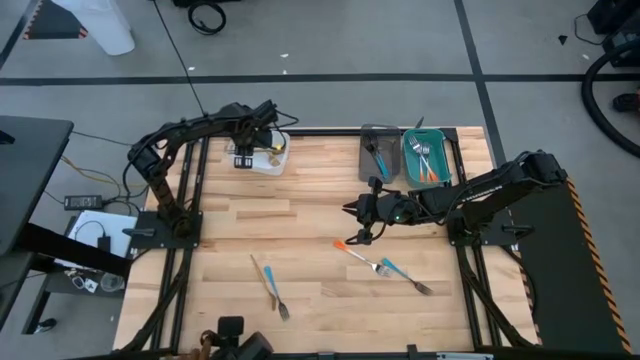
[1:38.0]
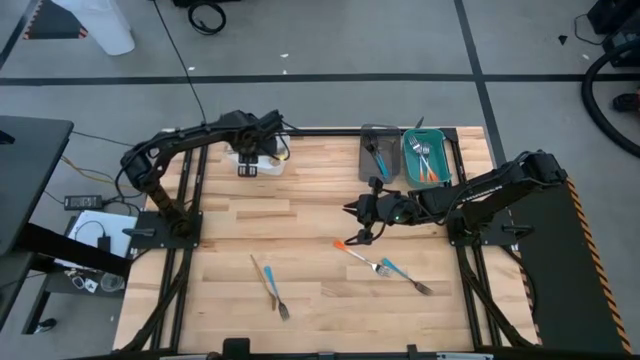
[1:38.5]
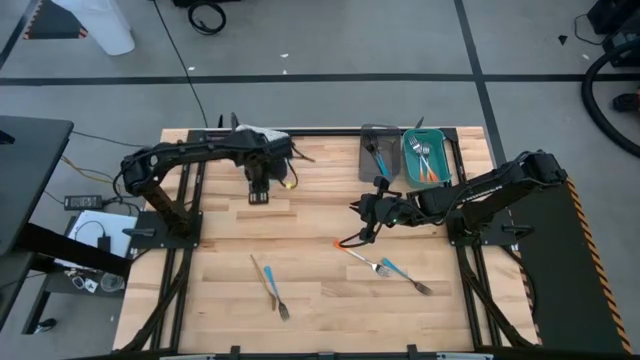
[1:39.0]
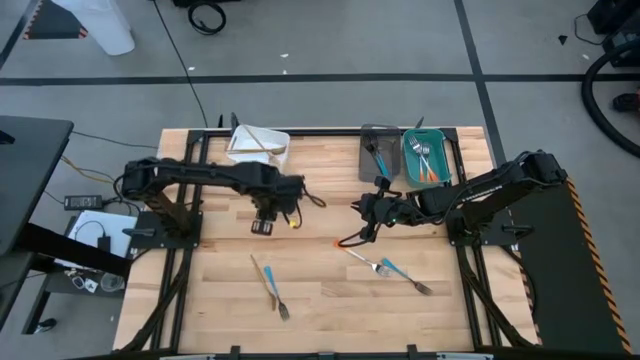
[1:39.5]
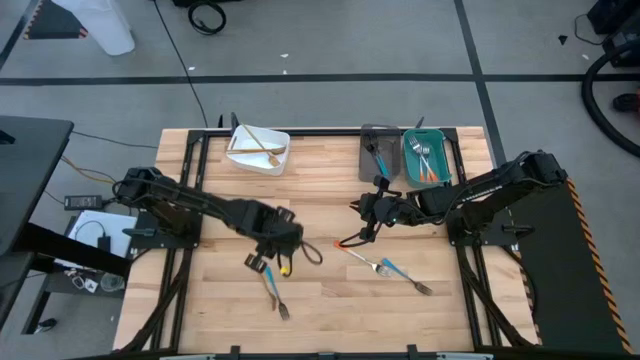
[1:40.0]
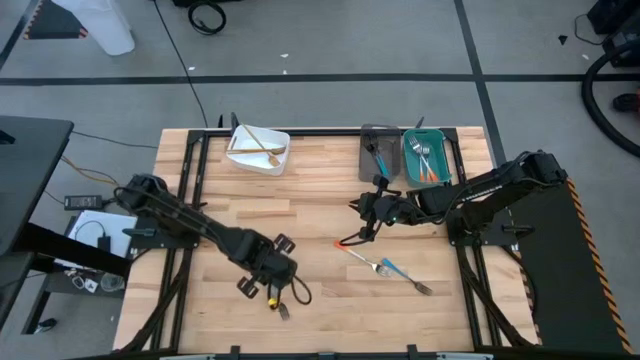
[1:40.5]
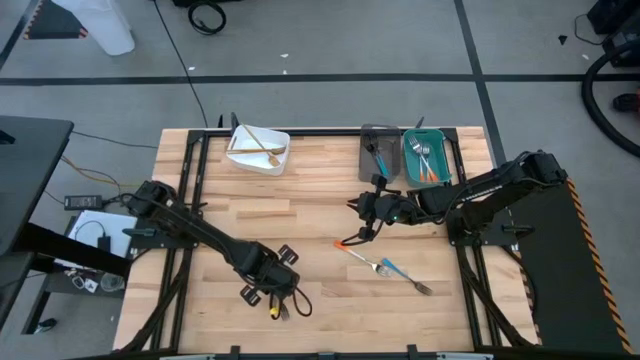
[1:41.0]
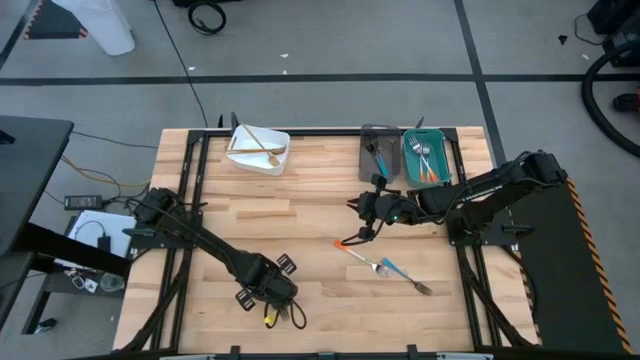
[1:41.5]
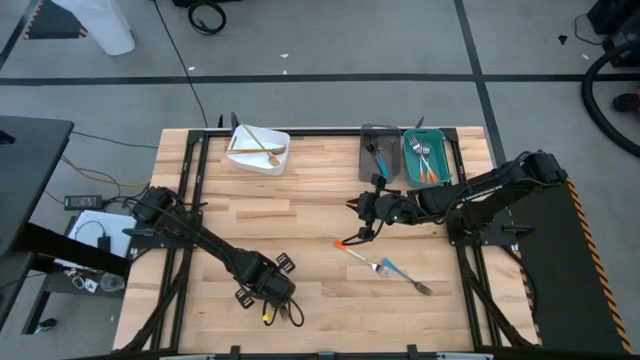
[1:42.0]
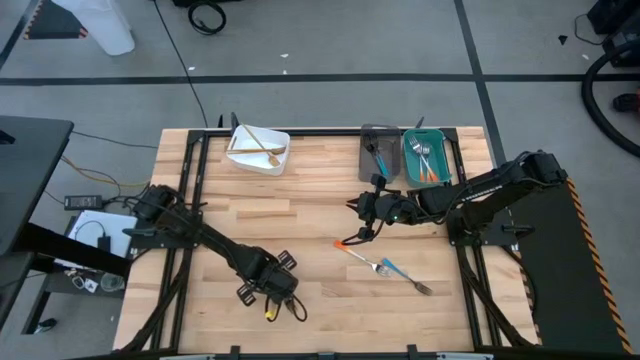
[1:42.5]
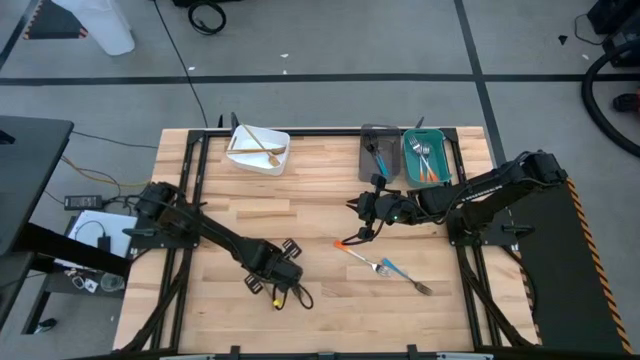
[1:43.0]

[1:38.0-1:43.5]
Task: Sort silverware by color (type)
Put the left blue fork into the black bin

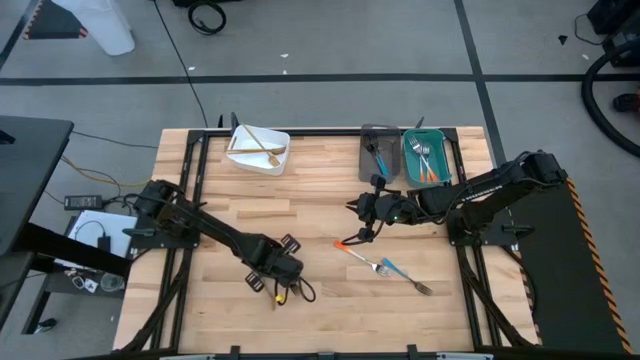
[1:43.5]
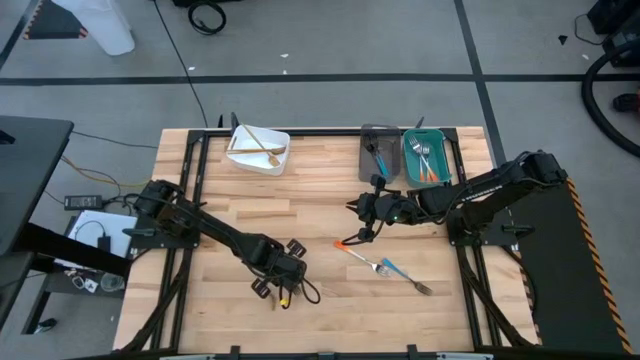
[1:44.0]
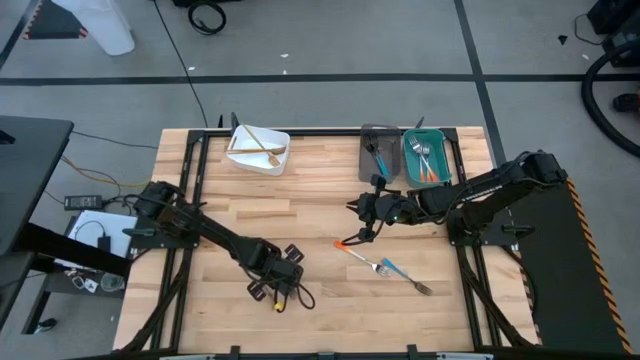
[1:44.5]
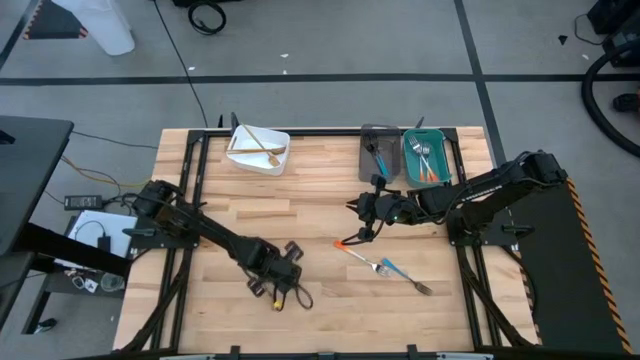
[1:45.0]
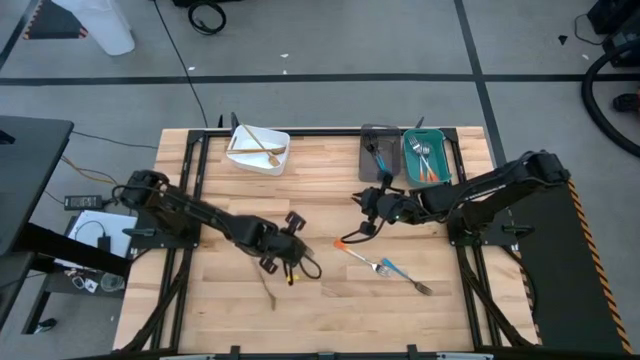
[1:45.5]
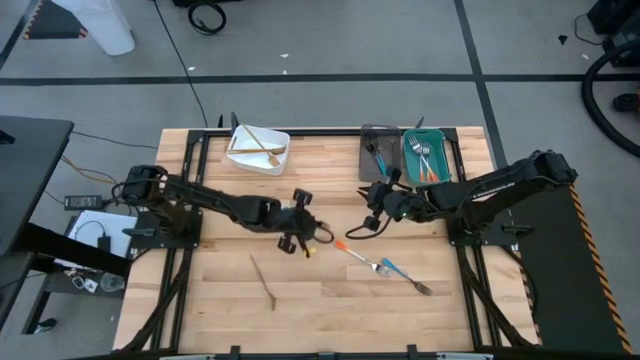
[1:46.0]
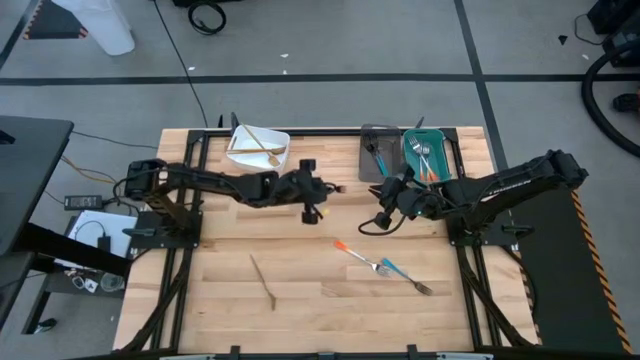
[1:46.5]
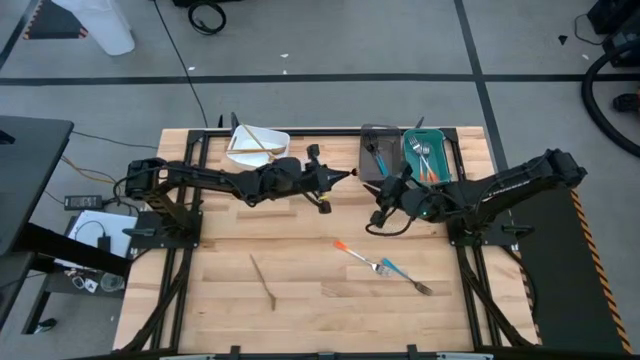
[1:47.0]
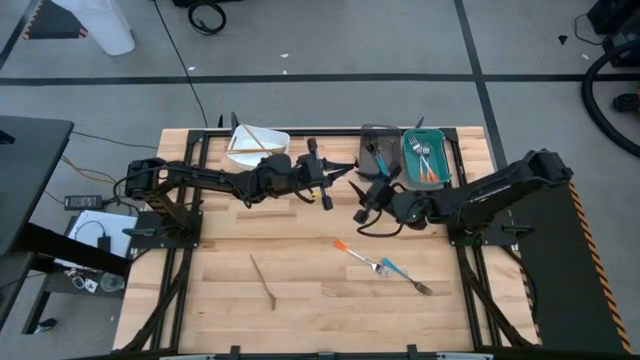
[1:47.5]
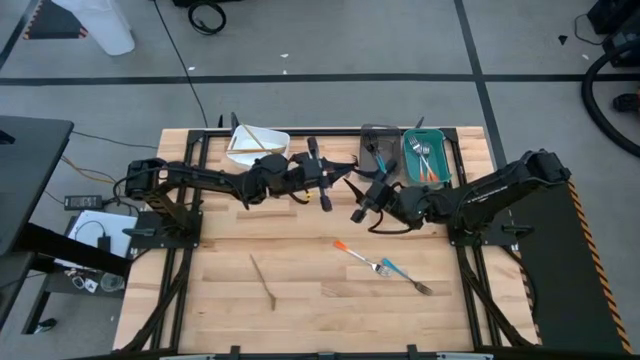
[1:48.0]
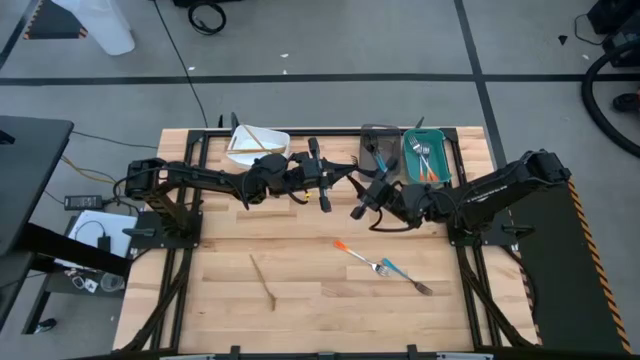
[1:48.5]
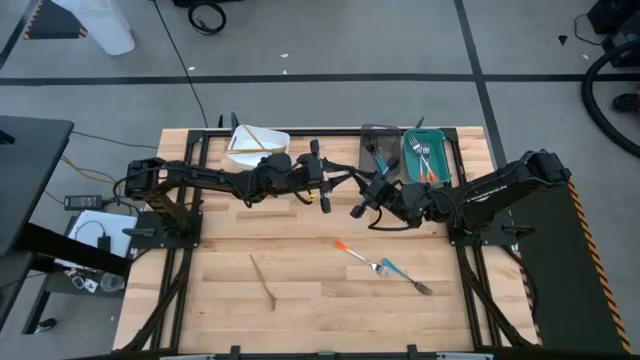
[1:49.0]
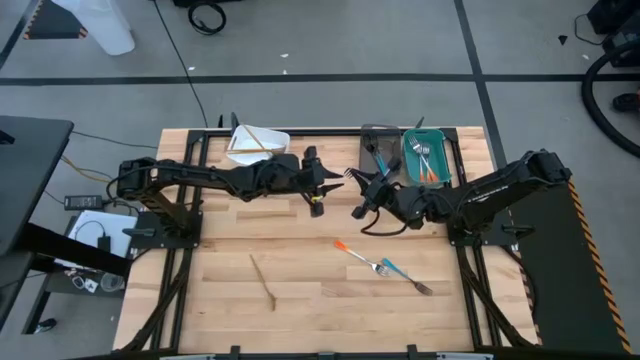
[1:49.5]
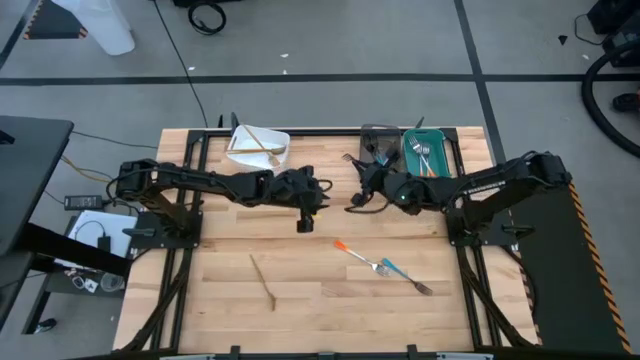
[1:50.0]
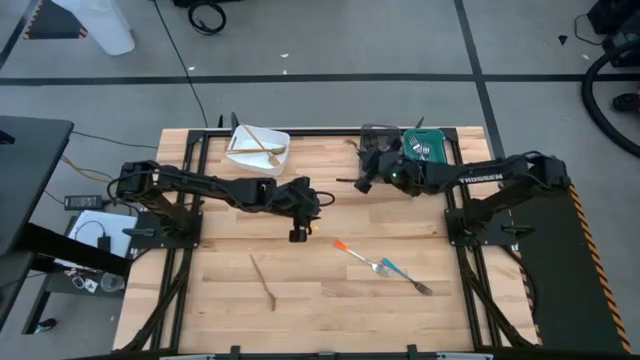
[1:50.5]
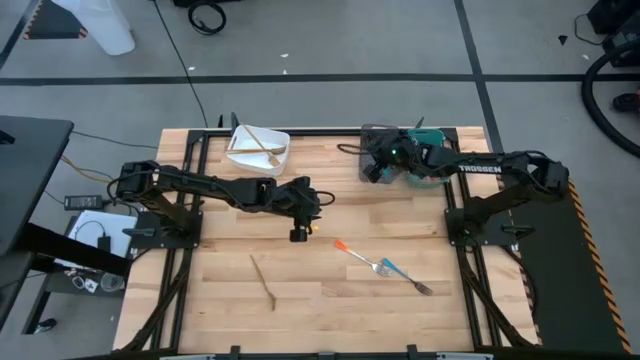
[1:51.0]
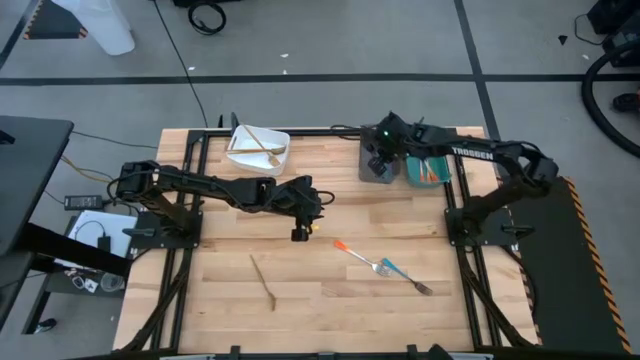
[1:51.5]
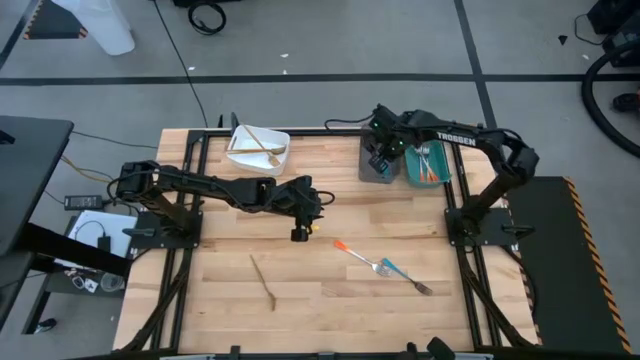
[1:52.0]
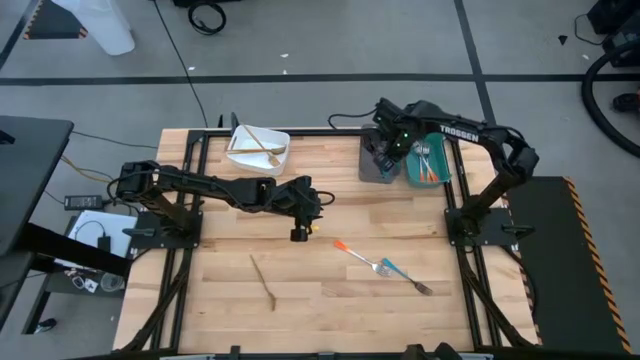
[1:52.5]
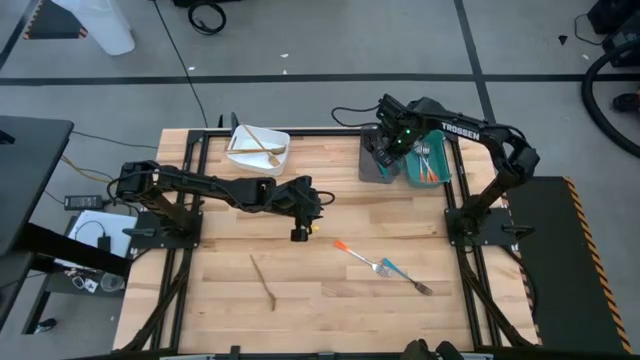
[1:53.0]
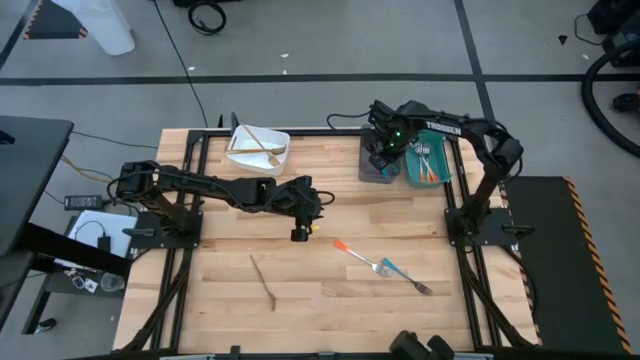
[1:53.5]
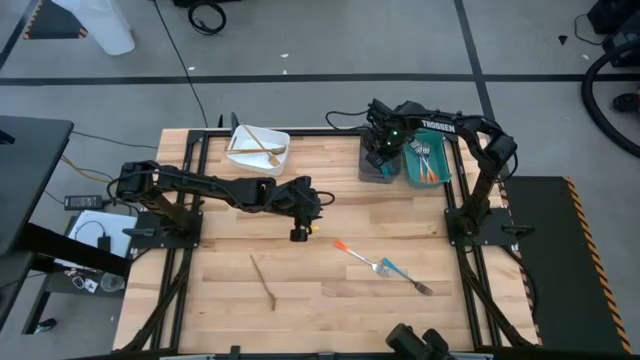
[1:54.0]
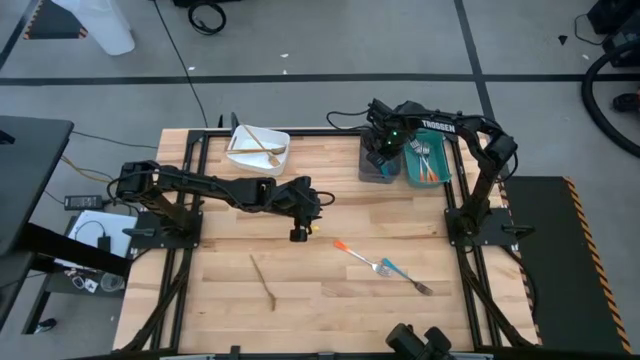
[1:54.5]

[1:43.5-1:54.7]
Put the left blue fork into the black bin

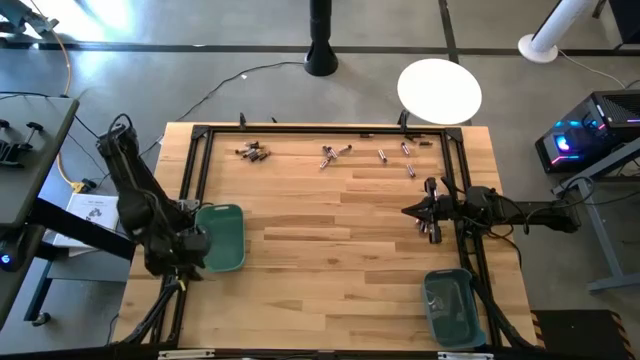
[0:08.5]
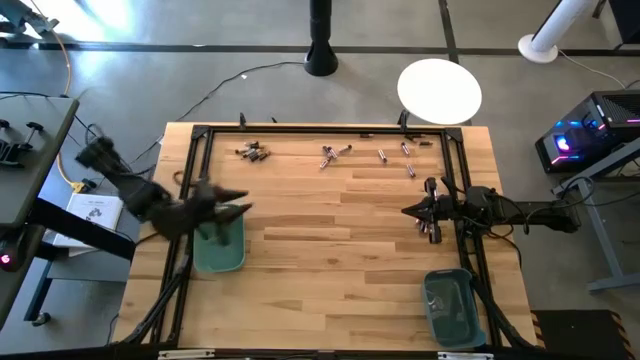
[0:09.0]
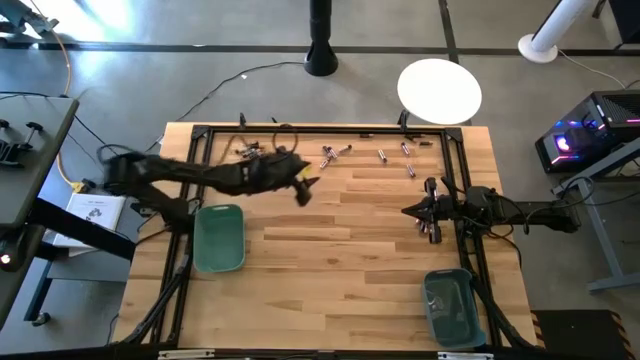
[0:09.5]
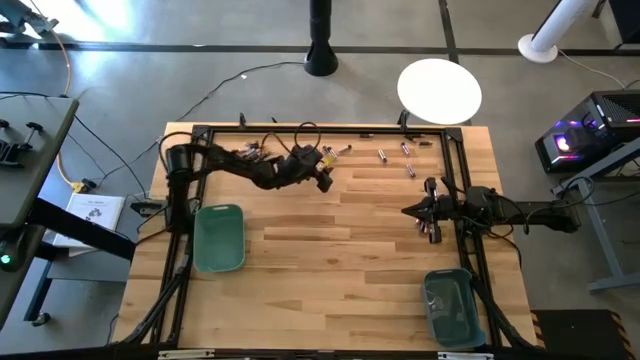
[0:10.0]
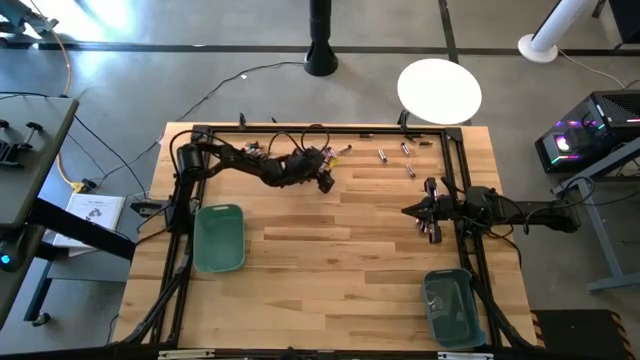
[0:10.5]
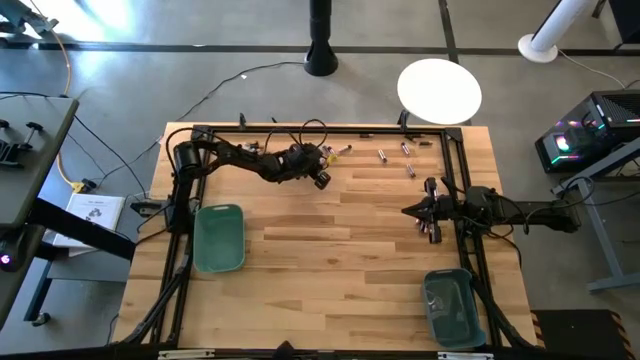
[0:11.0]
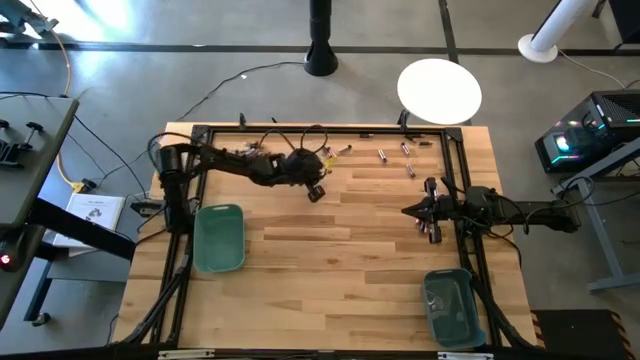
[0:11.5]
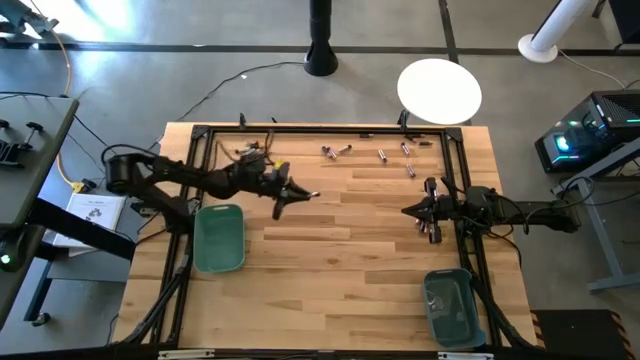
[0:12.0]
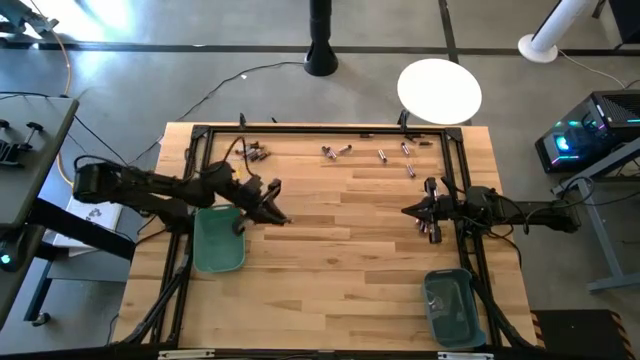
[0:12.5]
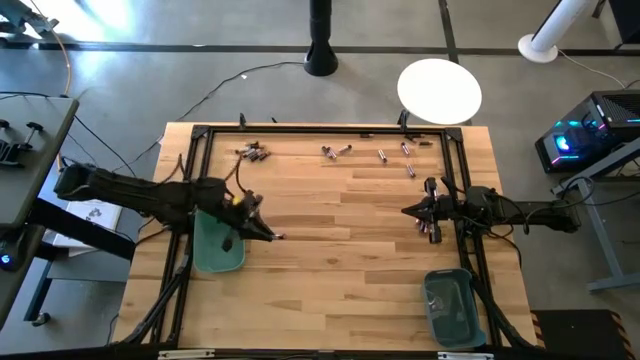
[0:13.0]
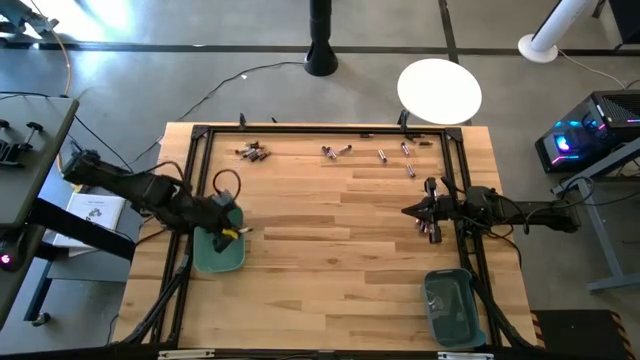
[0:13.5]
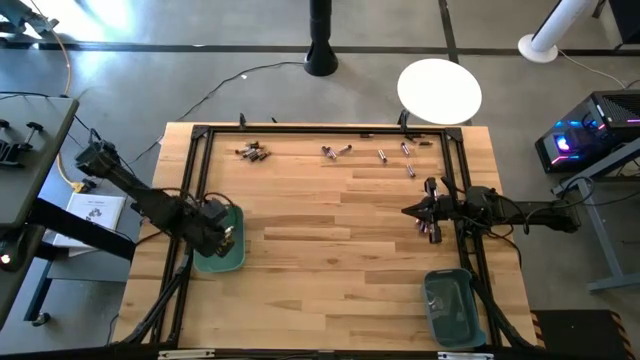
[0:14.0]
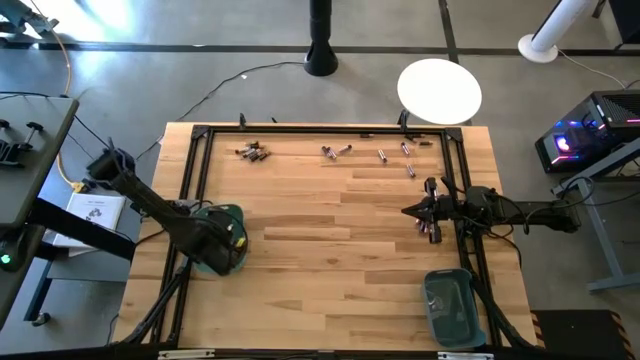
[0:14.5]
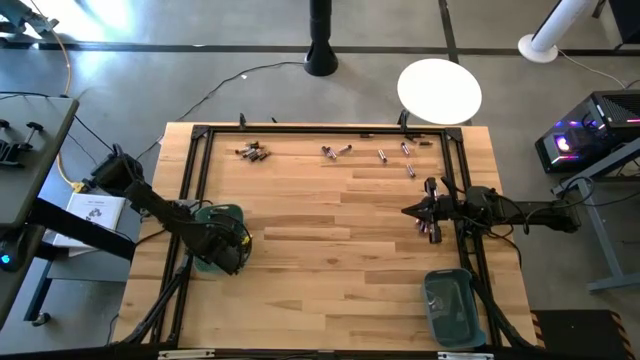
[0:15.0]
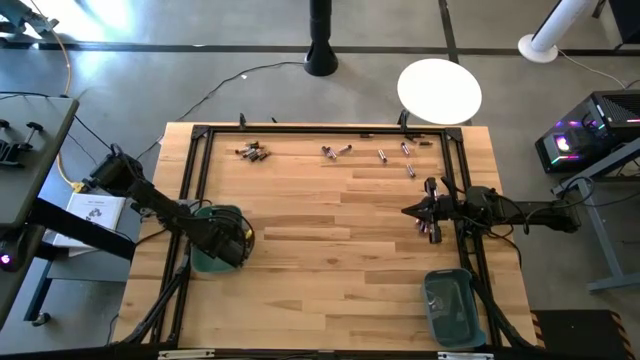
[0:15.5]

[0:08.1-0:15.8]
Task: Sort batteries
Put the silver battery into the green bin
